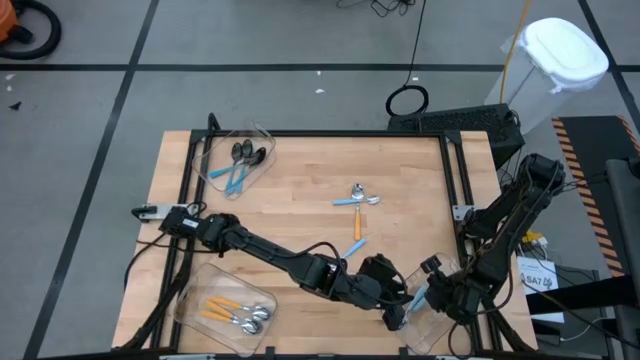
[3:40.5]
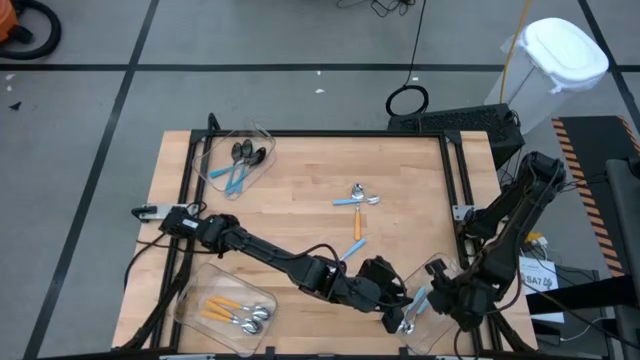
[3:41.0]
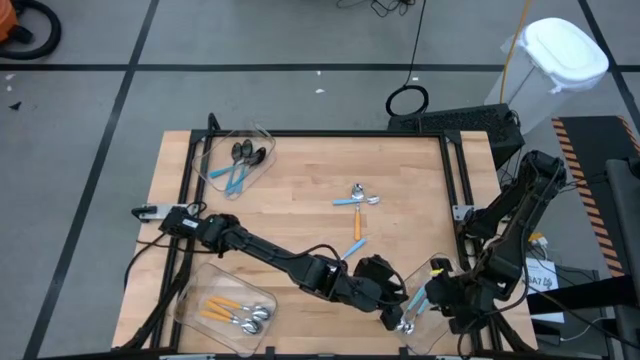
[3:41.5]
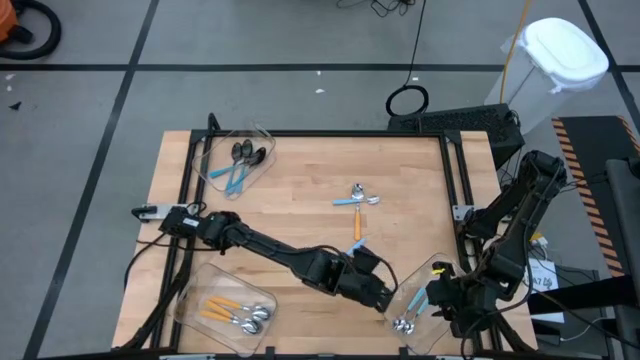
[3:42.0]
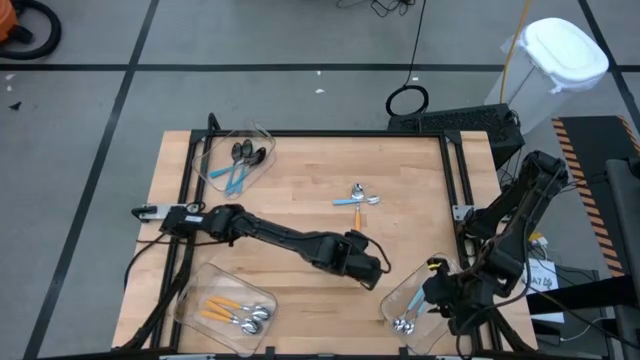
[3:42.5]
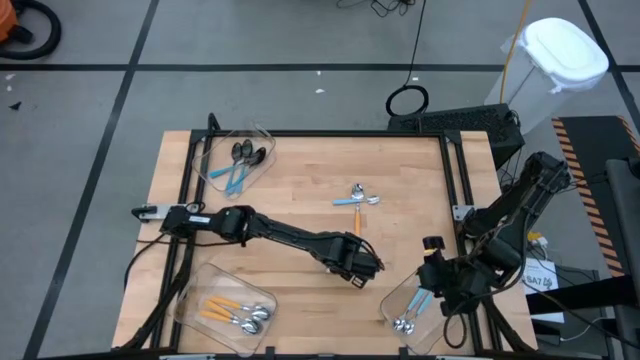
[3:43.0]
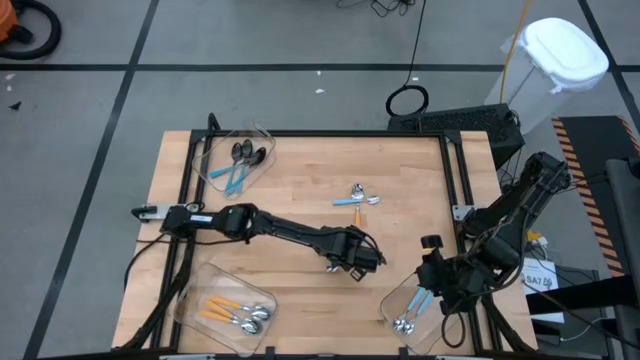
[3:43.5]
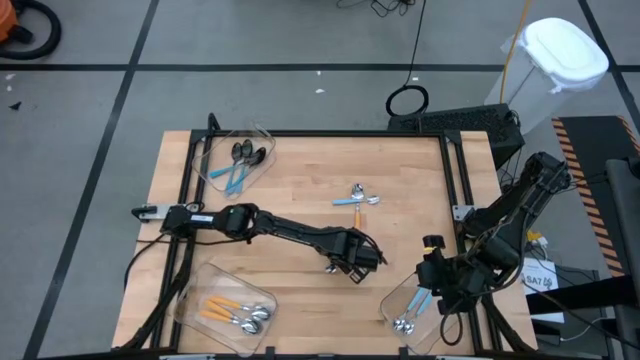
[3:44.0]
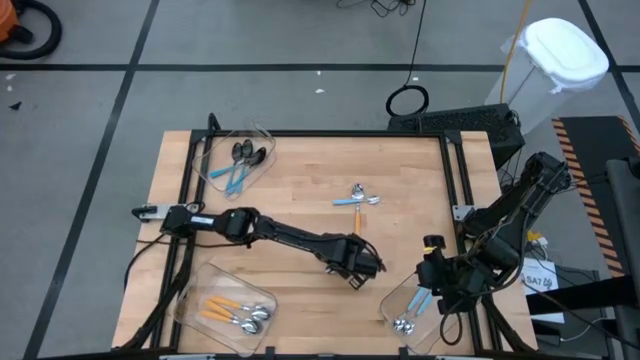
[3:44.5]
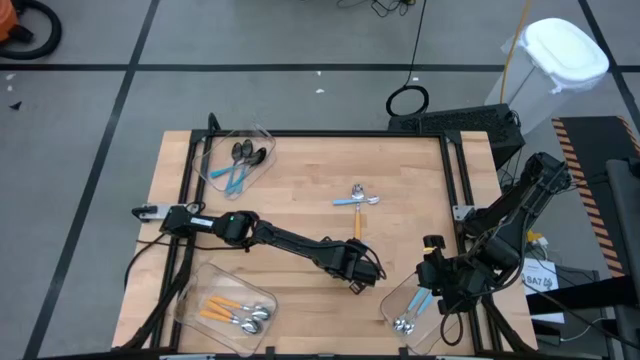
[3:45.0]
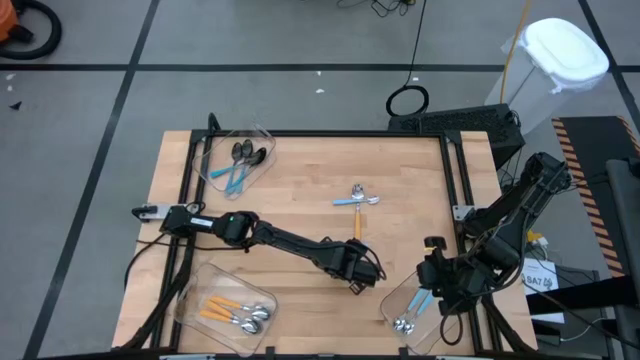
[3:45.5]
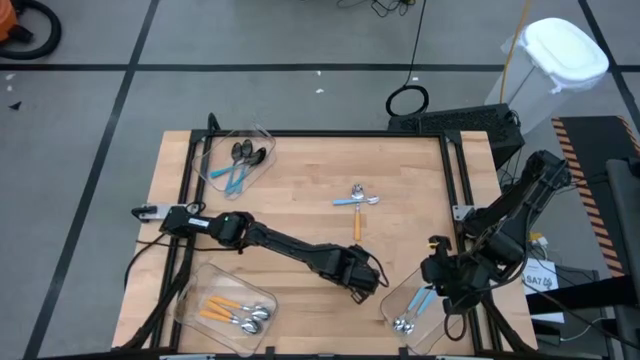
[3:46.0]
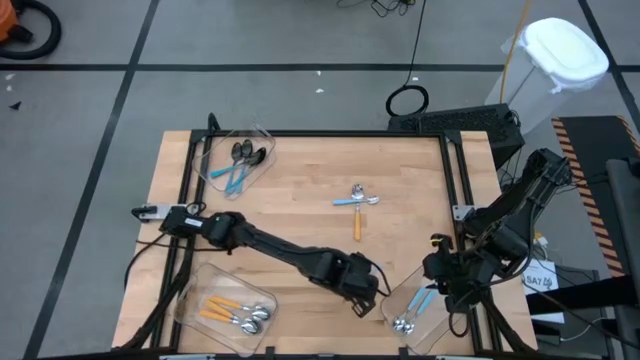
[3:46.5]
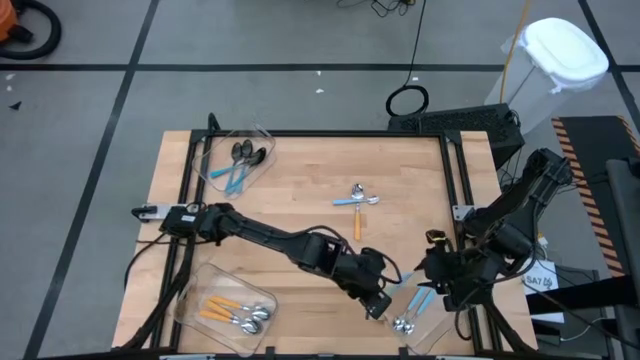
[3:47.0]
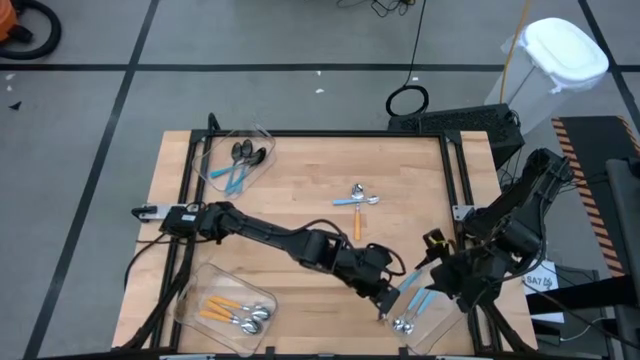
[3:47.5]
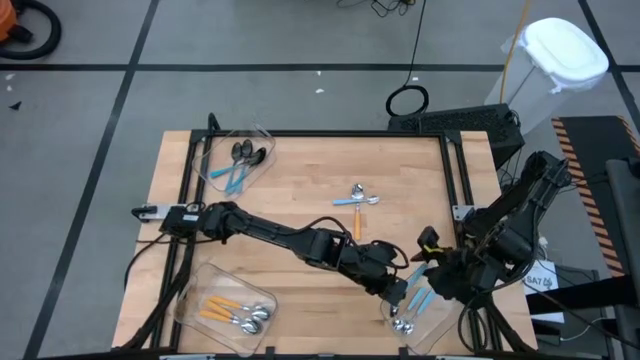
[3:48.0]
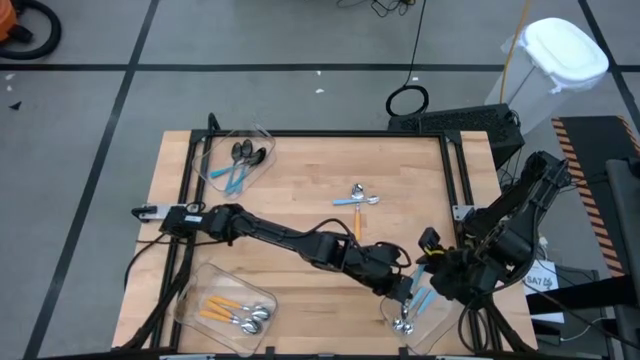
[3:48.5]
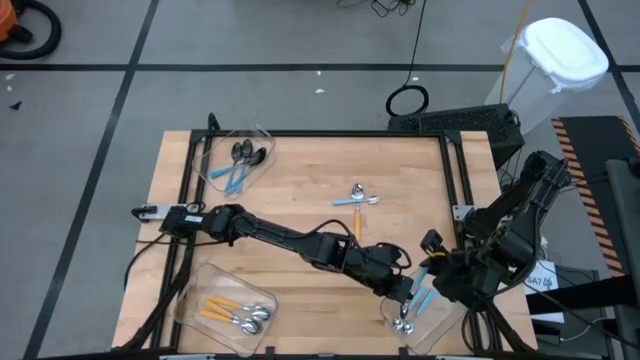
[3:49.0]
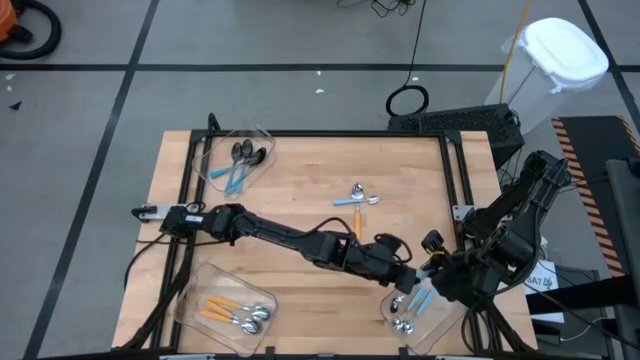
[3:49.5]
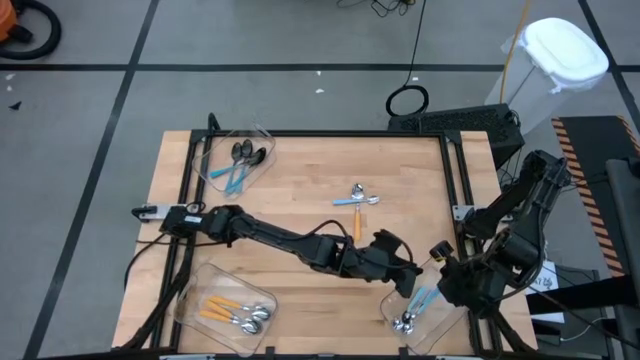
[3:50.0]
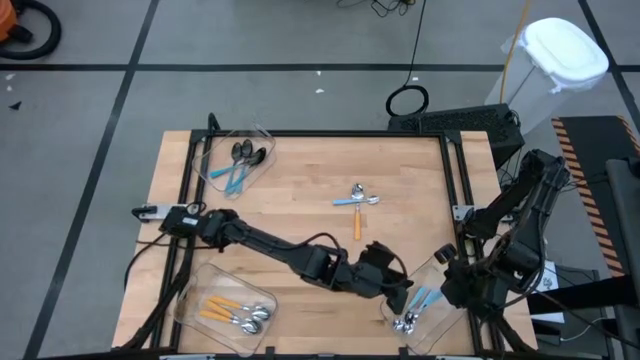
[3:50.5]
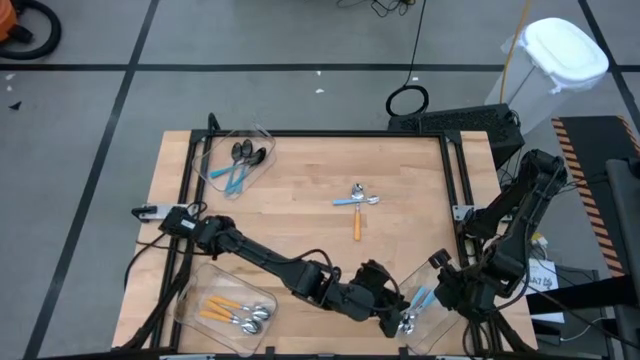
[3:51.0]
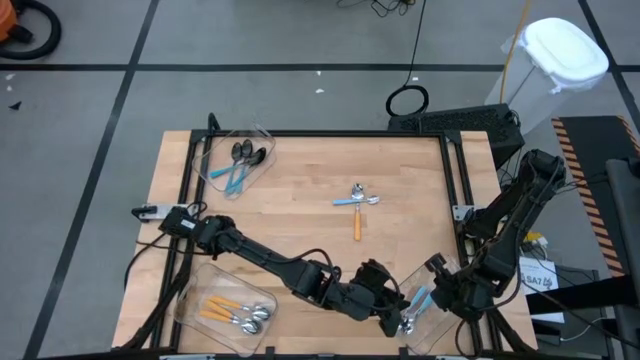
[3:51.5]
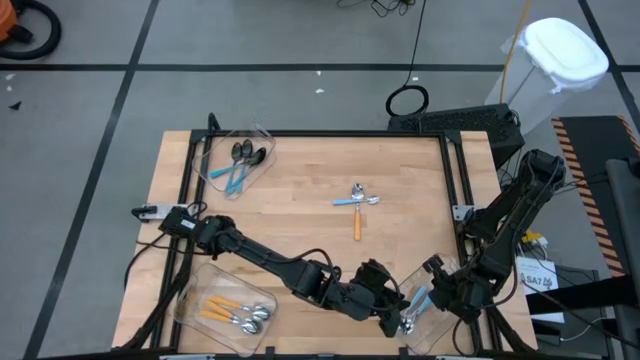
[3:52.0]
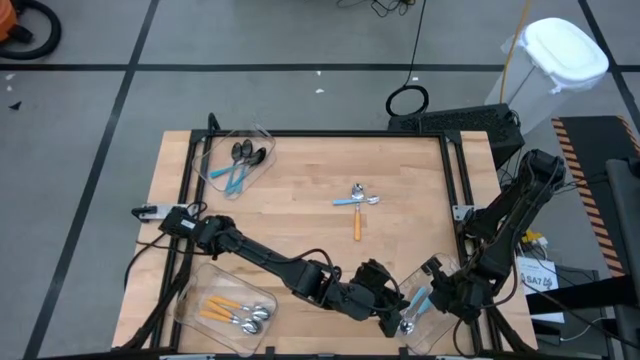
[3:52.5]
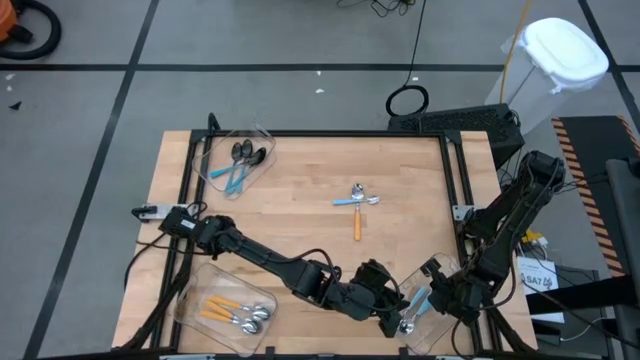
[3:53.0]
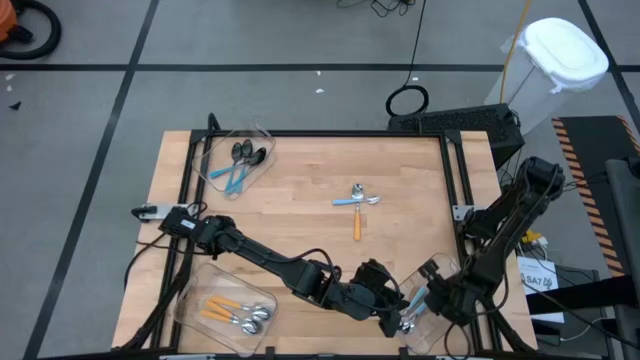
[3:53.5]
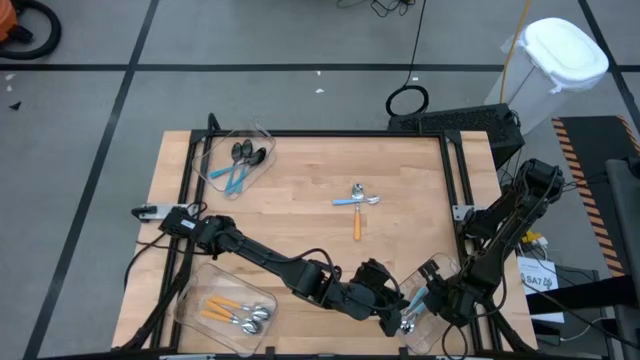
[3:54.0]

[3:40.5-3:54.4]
Task: Sort silverware by color (type)
Put the light blue spoon into the bottom right transparent bin

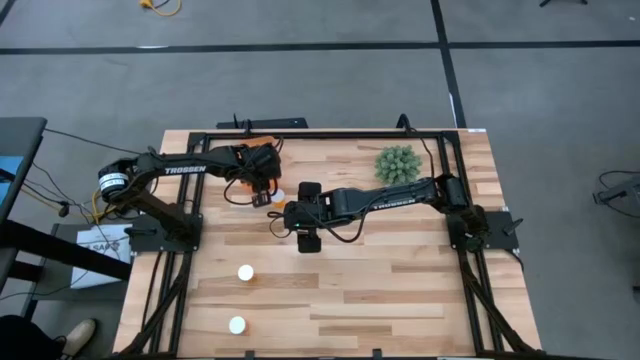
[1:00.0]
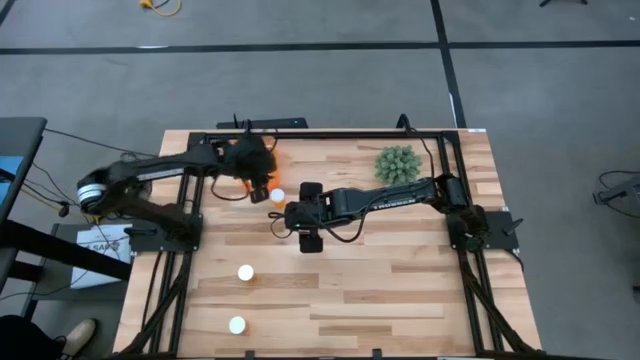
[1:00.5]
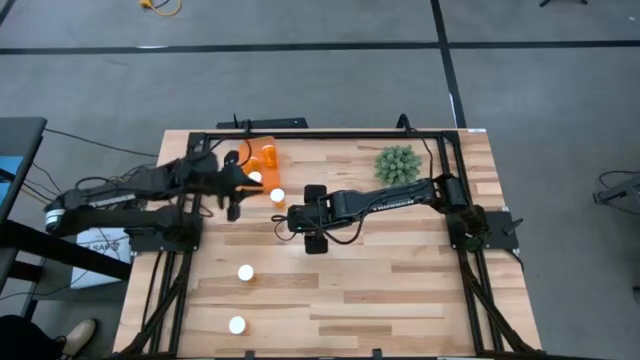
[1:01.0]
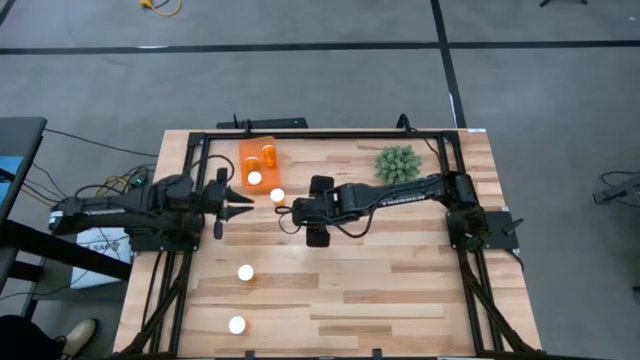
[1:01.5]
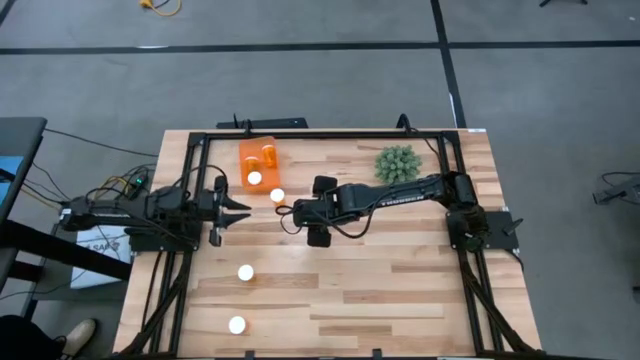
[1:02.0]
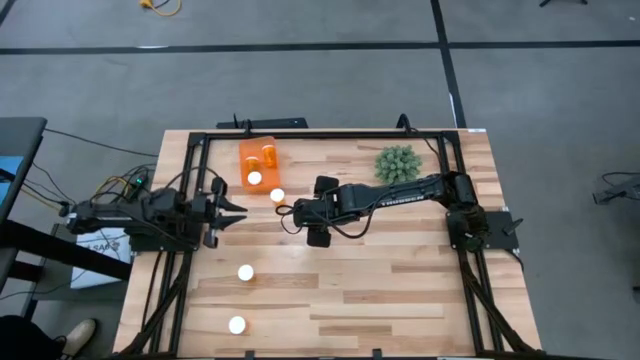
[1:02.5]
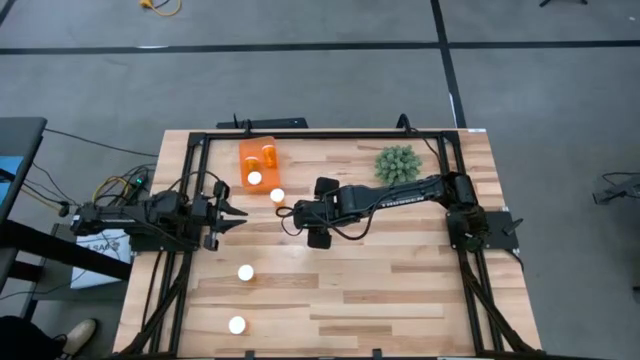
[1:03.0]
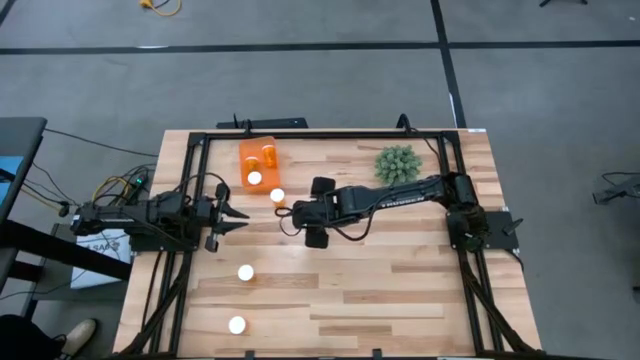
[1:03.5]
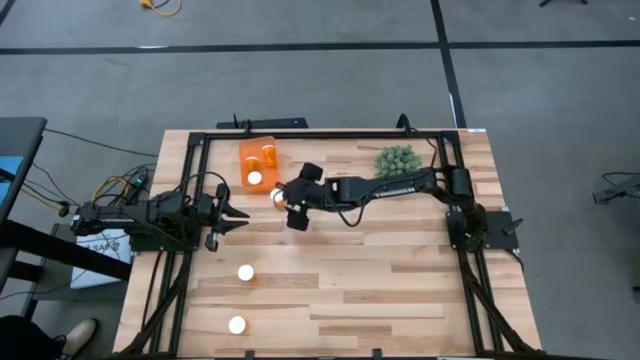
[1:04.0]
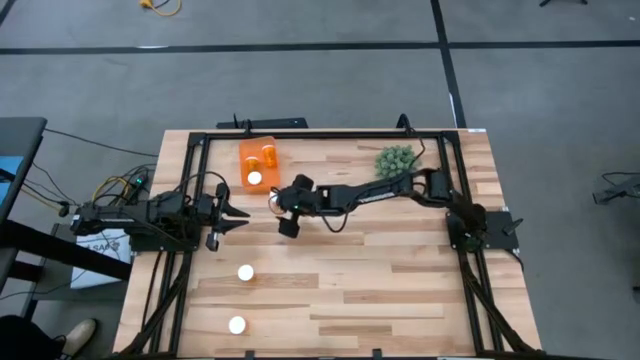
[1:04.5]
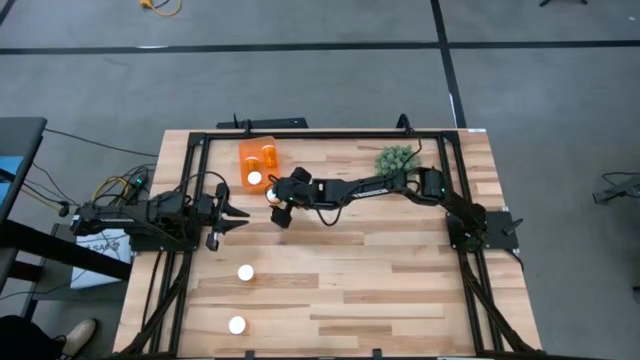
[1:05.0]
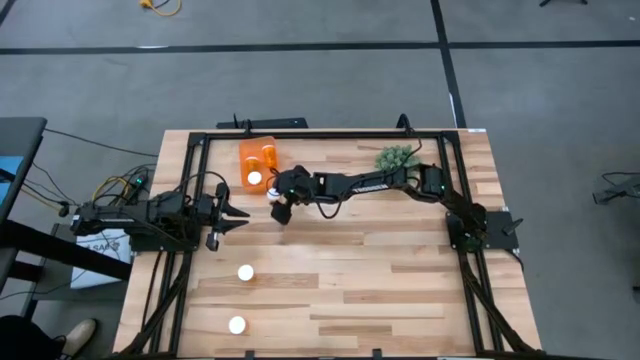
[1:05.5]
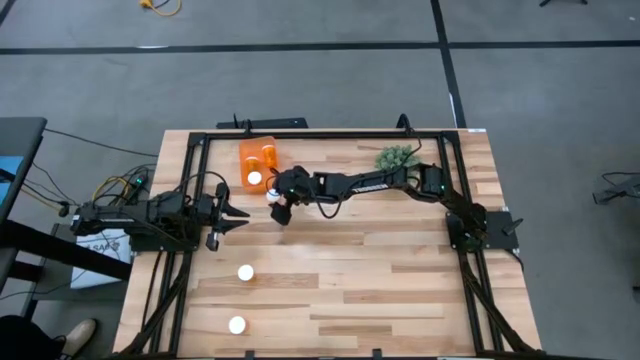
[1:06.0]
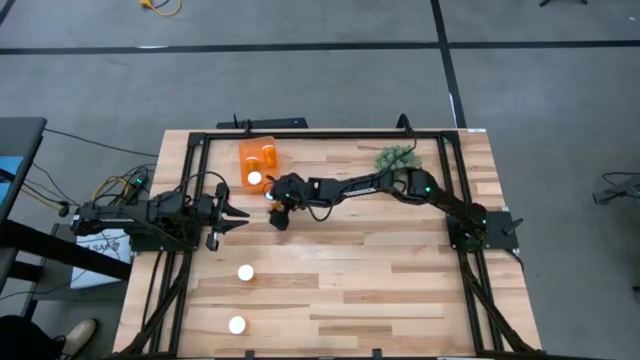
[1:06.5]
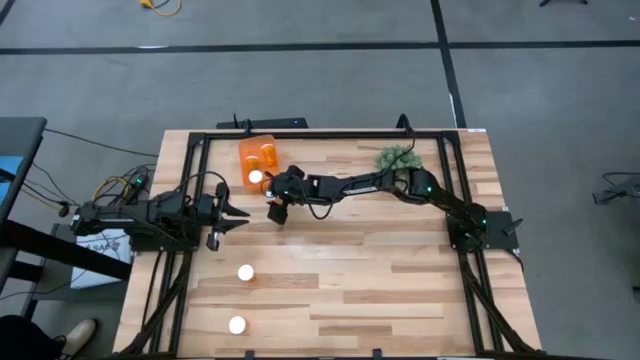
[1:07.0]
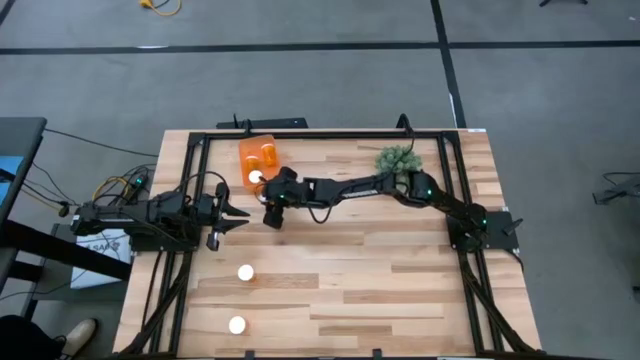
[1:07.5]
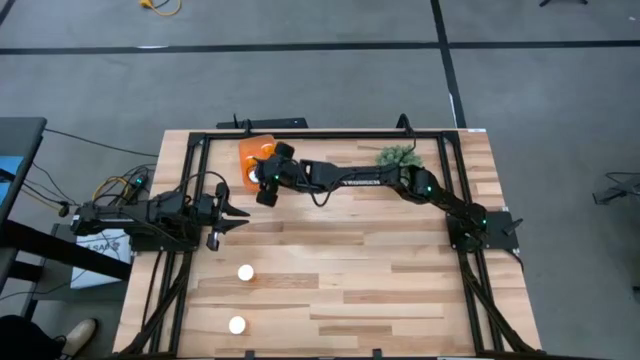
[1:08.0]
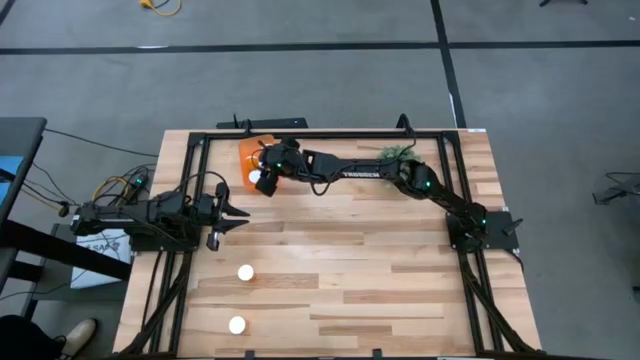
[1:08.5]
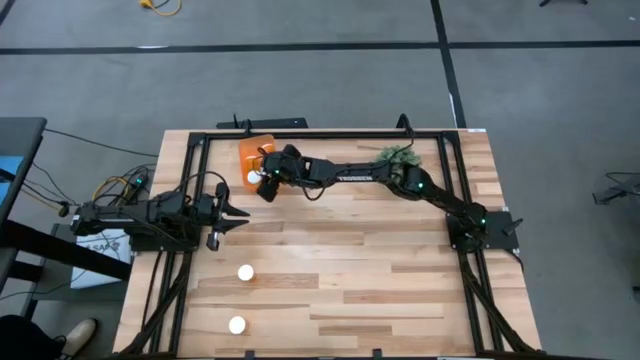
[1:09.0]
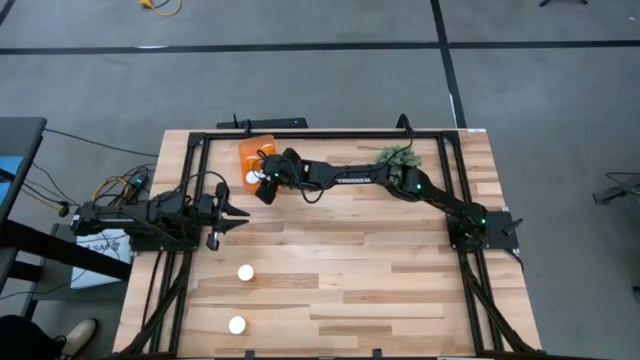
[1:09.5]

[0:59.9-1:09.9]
Task: Pick and place pill bottles into a basket
Put the orange pill bottle into the orange container
